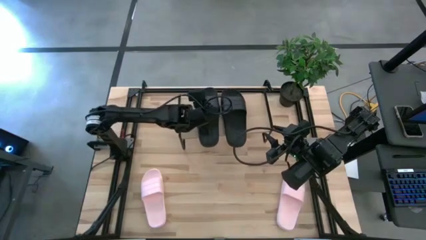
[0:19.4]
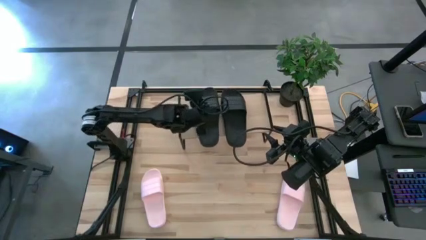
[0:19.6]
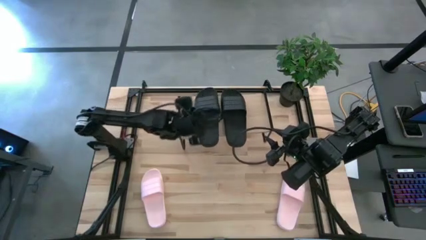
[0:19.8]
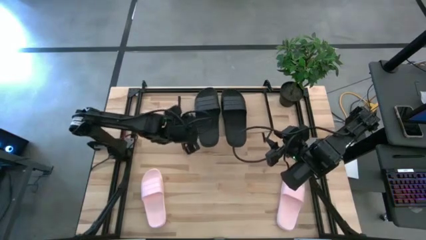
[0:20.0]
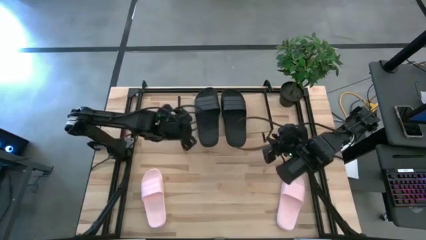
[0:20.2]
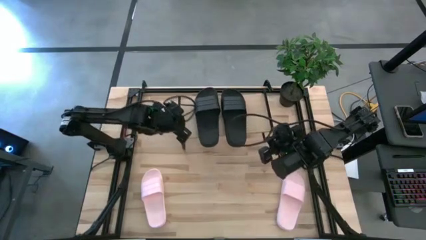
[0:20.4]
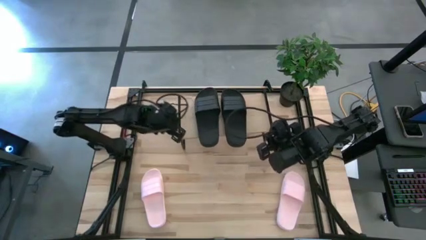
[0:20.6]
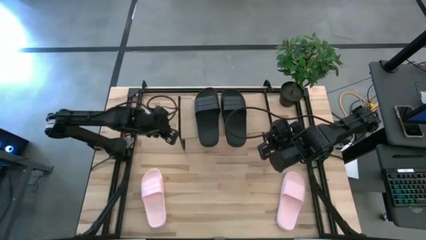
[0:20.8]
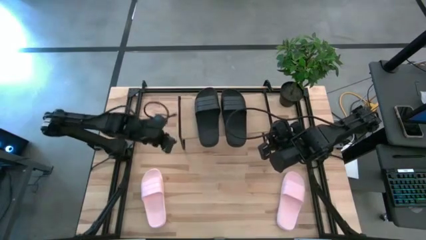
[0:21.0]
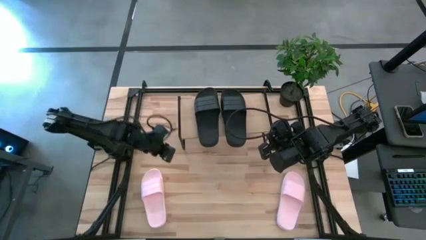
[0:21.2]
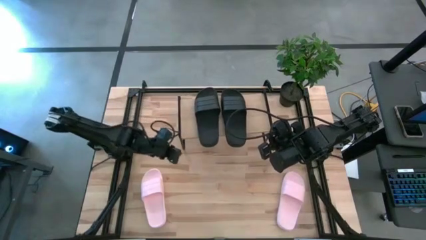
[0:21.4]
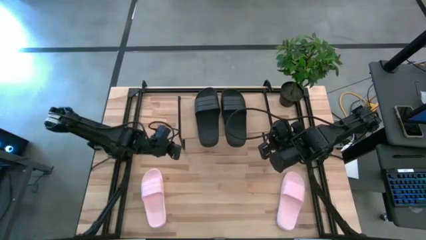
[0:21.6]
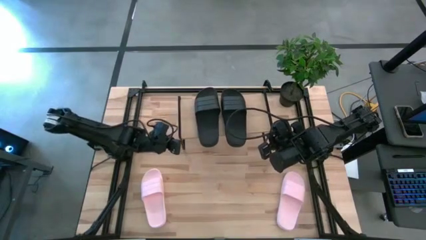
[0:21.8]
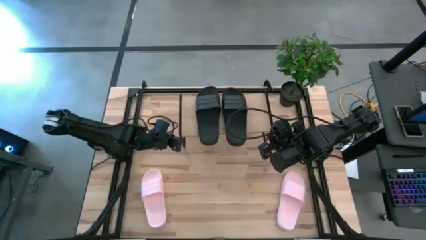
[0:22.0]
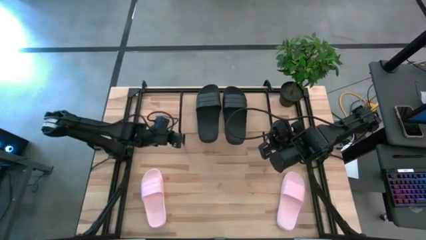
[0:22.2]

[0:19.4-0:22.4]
Task: Pick and place slides into the shelf
Adjust the shelf

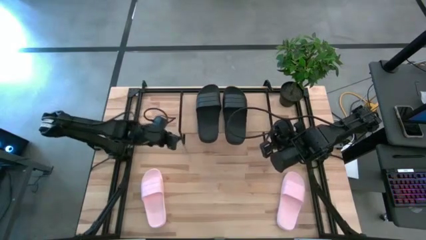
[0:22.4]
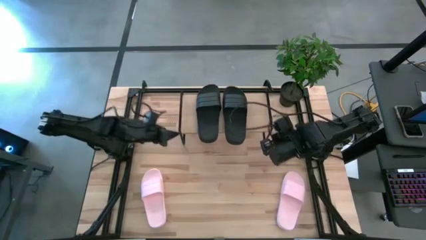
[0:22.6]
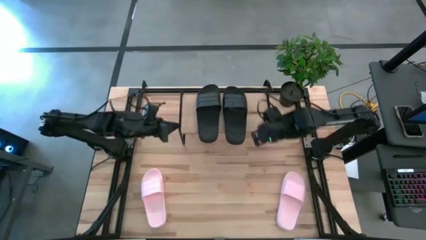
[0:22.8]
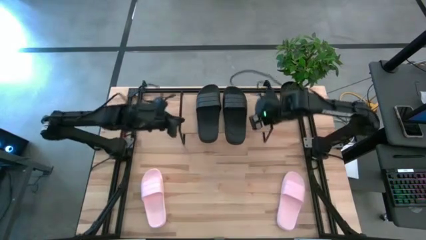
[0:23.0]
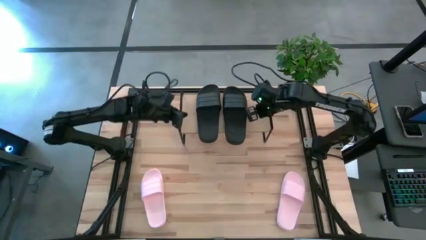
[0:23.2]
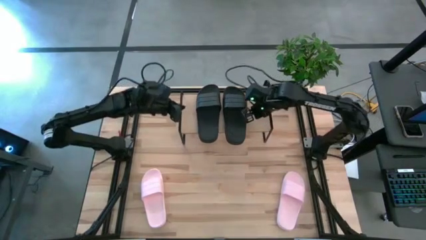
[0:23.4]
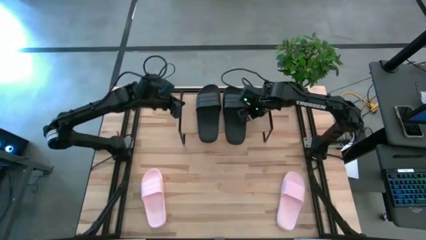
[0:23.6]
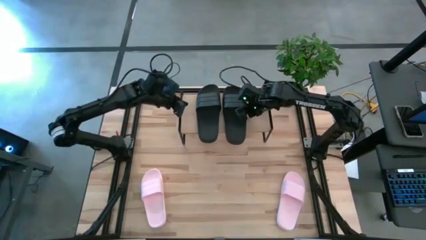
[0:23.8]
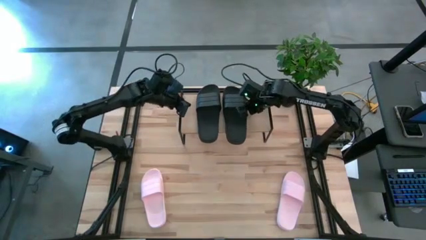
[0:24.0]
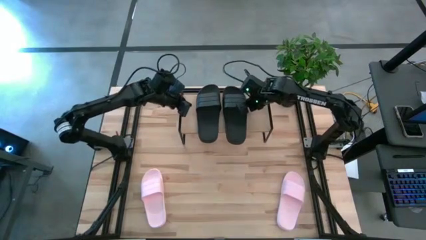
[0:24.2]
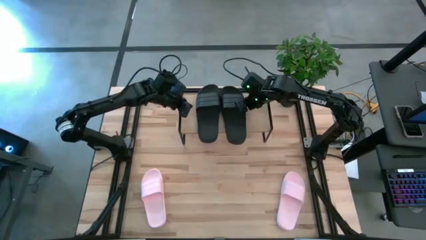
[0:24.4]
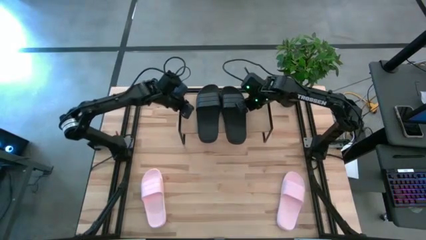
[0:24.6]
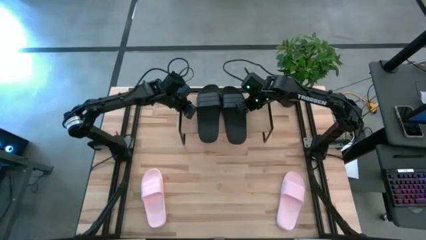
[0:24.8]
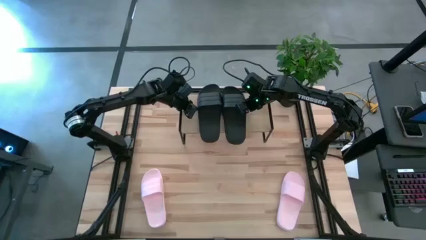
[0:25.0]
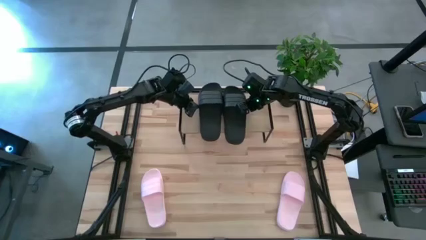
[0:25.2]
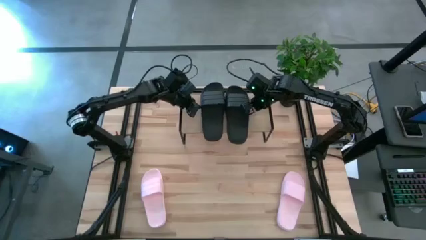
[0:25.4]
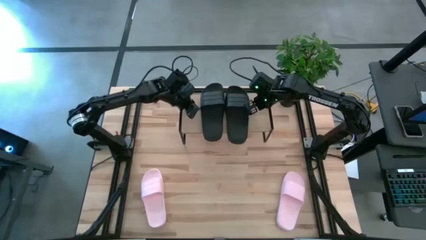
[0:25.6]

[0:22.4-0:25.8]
Adjust the black slides on the shelf

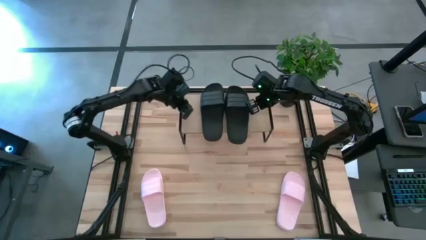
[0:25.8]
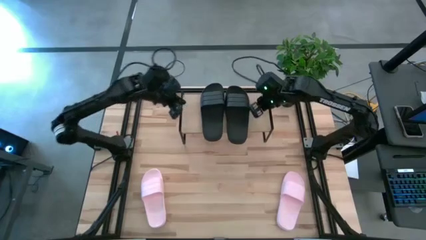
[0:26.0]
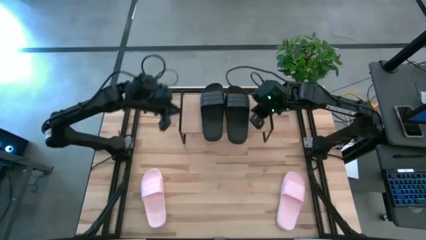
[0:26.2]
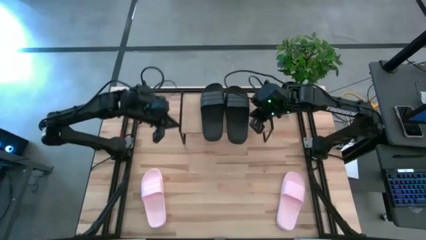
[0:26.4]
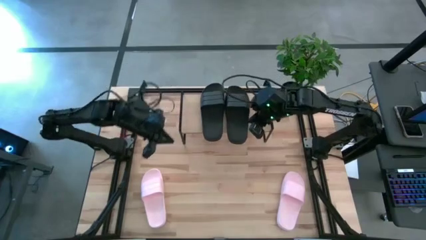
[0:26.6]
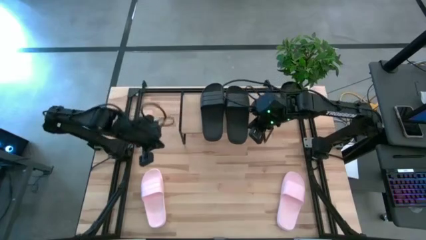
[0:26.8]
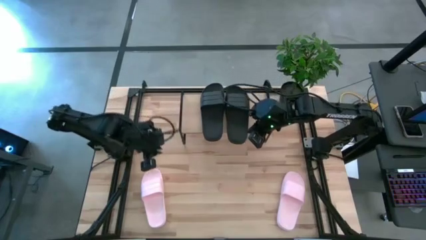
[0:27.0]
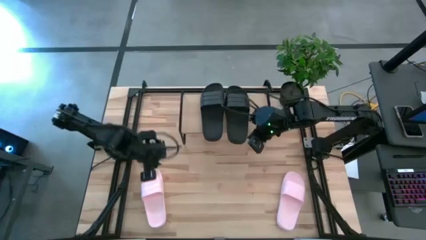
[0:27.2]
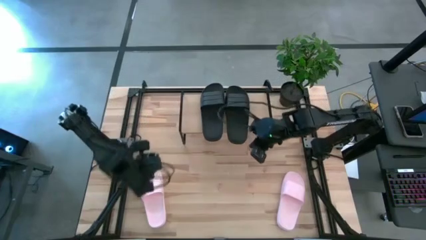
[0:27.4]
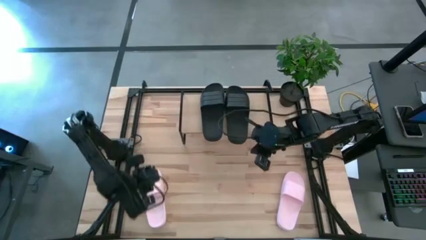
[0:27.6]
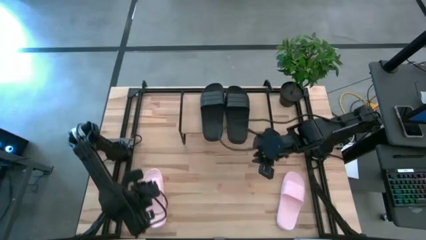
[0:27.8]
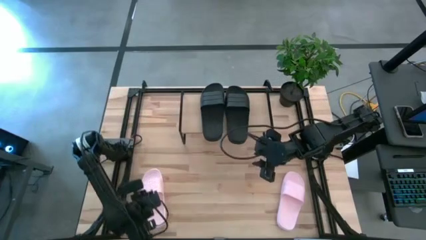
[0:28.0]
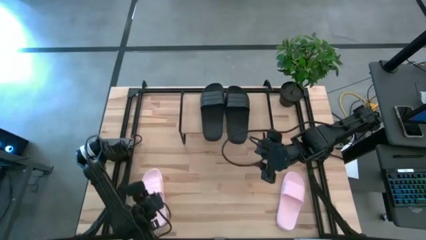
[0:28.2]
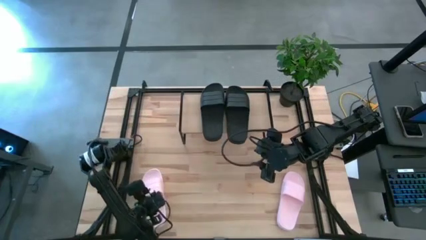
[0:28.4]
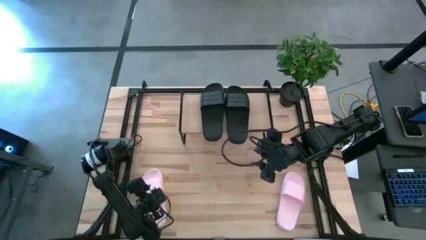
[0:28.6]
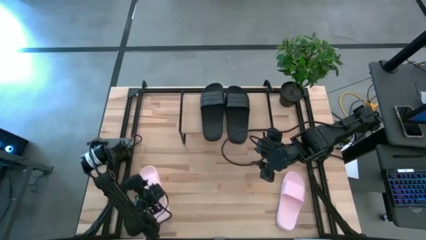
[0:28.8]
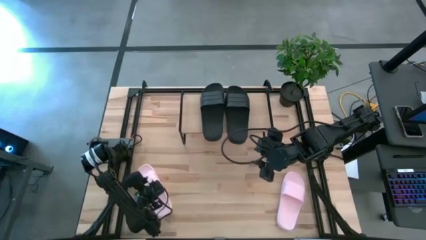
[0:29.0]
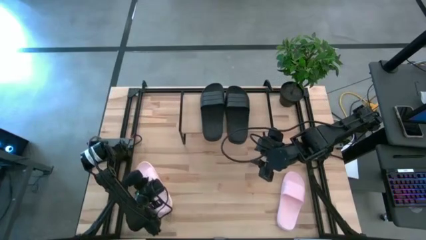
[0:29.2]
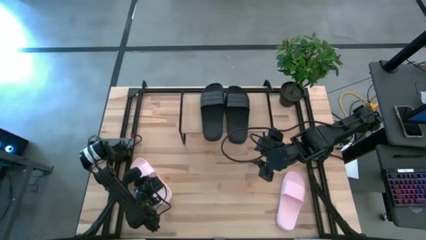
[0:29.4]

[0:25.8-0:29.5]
Move the left pink slide to the center of the table

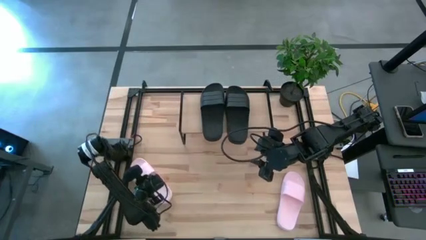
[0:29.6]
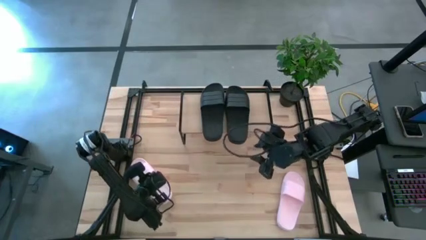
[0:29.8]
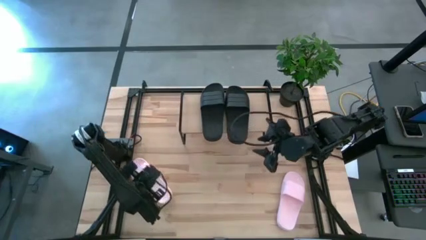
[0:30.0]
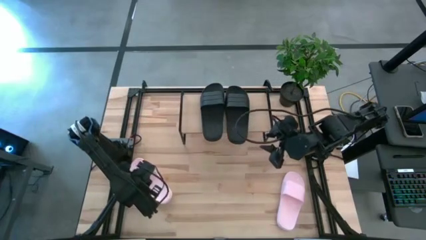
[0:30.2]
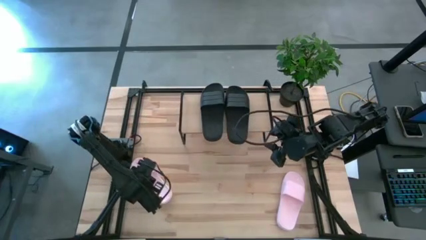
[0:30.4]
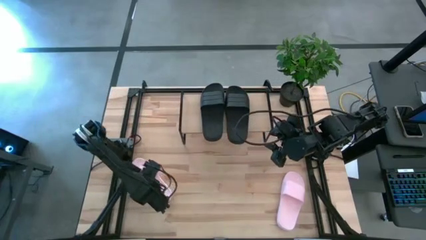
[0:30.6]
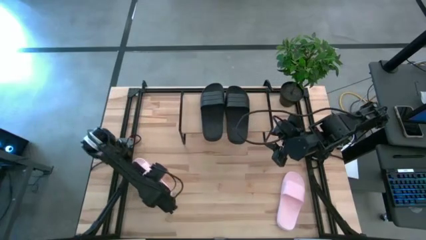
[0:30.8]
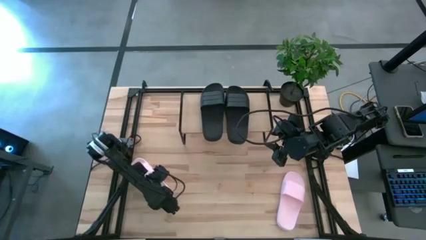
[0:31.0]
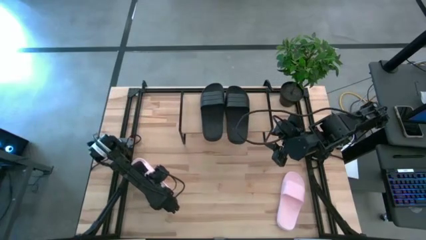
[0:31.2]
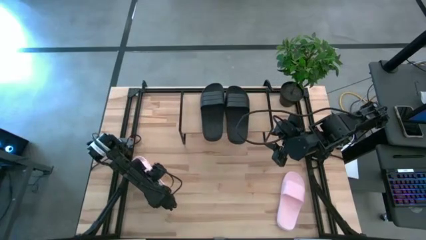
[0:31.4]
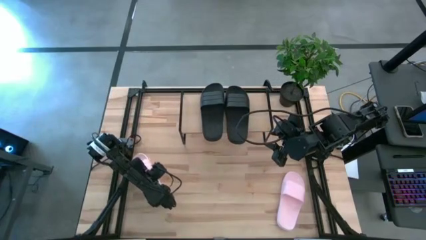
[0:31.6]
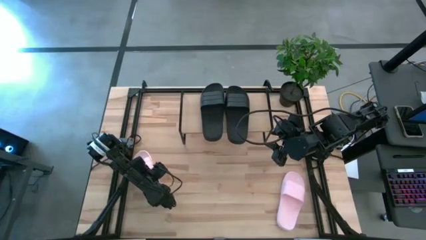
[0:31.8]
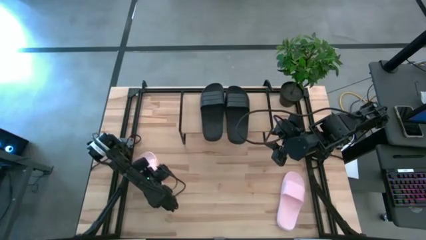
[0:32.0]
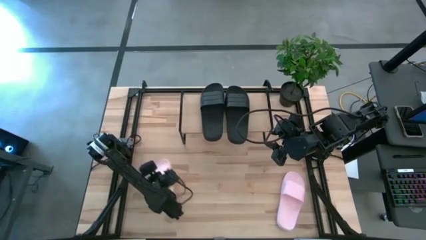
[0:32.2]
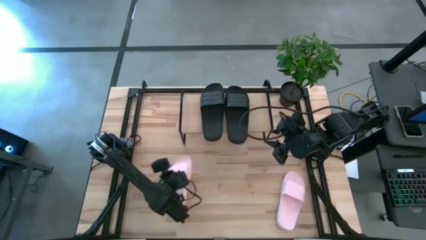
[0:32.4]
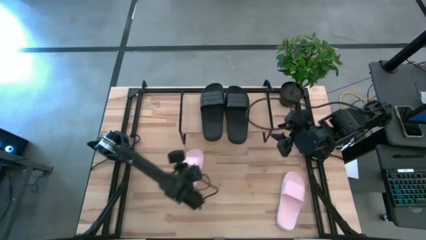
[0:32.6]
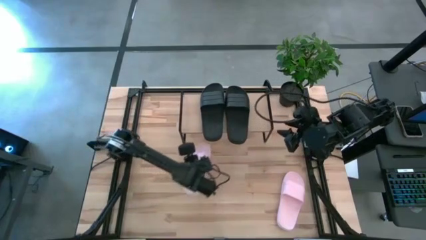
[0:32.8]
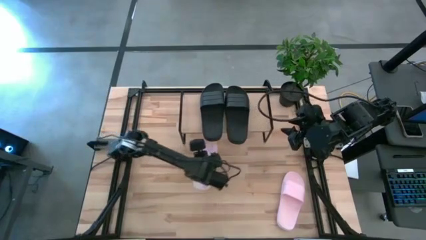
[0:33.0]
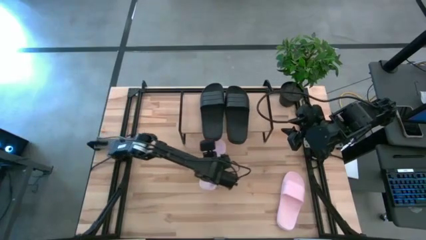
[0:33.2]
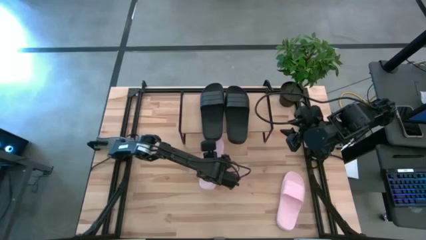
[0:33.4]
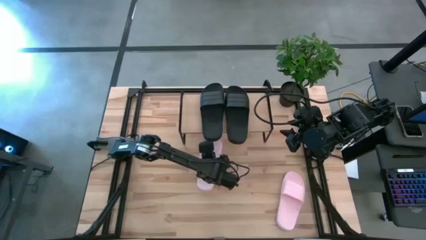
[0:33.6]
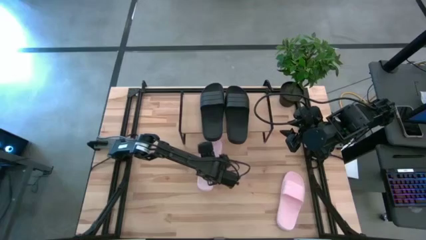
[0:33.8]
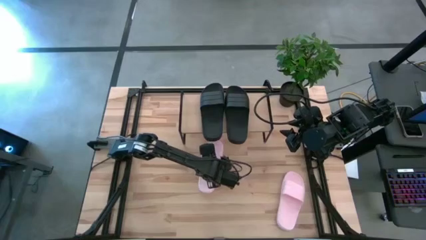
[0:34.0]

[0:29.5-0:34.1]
Move the left pink slide to the center of the table

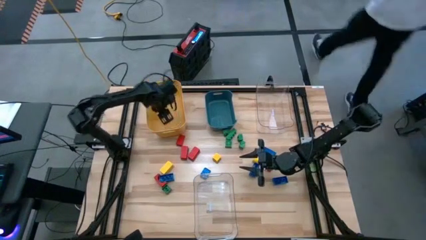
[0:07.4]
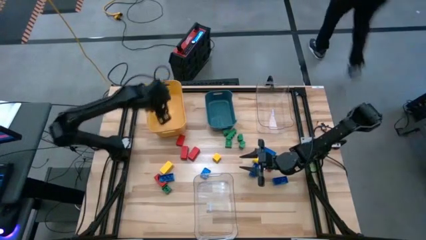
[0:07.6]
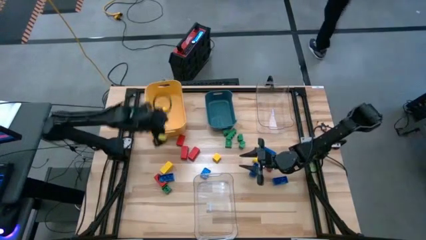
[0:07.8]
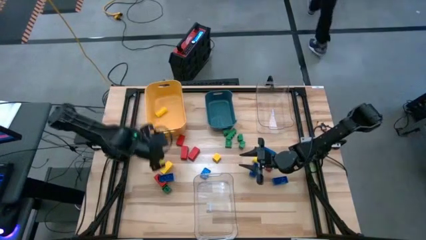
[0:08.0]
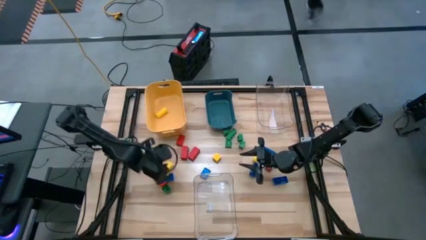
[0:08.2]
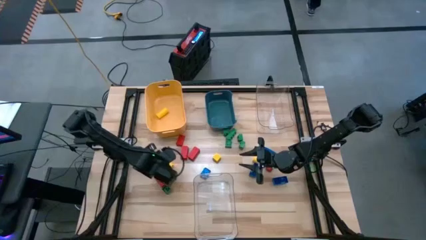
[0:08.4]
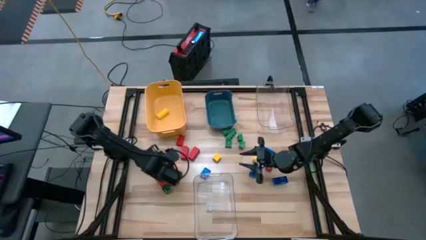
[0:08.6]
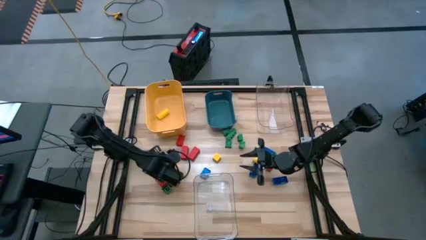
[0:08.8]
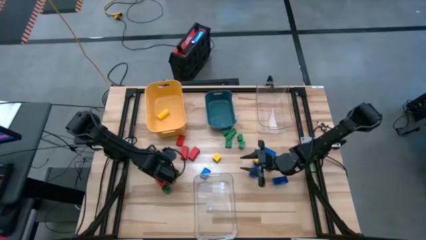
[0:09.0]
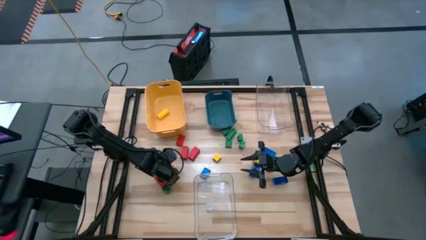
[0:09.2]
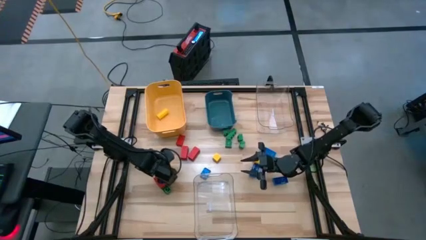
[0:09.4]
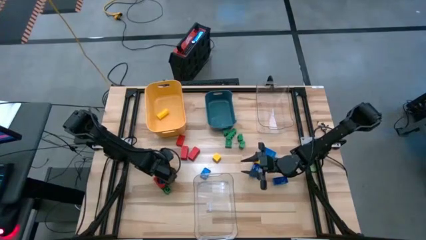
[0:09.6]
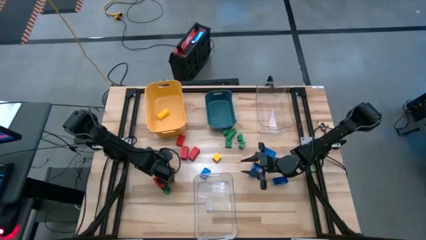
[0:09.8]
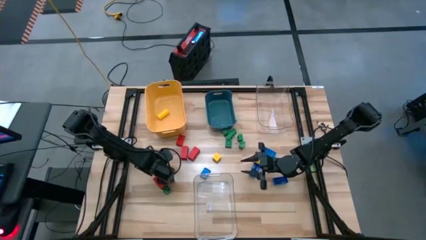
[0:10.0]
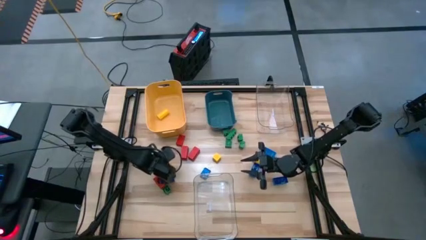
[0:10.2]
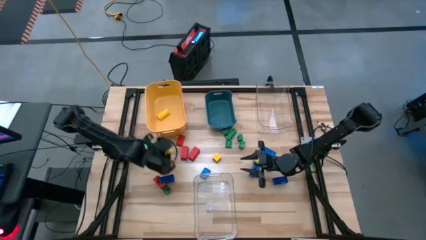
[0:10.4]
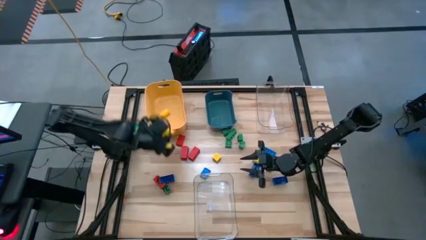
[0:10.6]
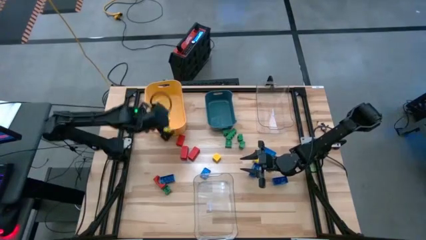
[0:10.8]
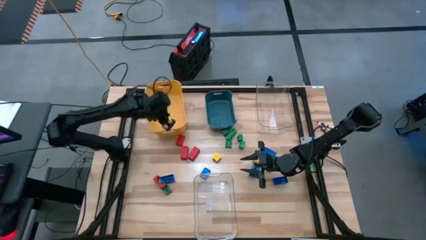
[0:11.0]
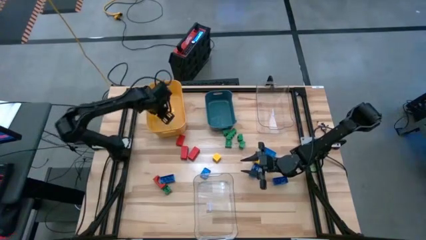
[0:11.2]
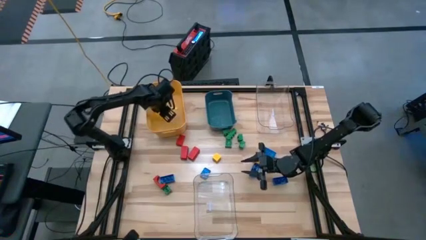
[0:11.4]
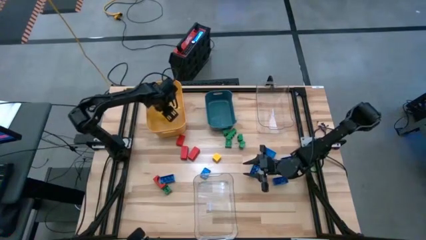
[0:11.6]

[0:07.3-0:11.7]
Task: Sort blocks
Put the yellow wooden block into the yellow bin
